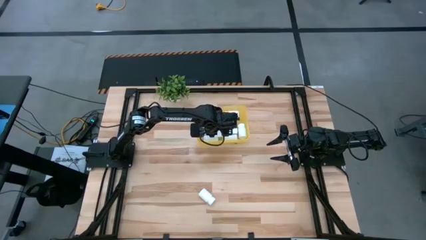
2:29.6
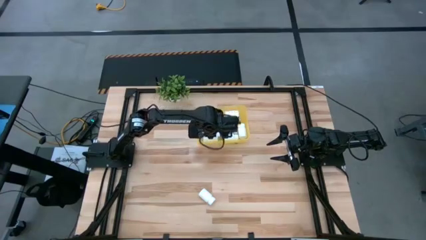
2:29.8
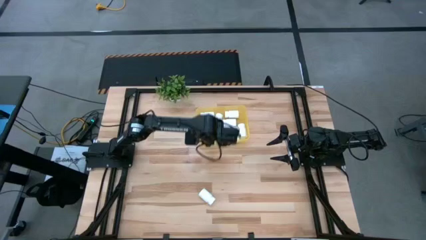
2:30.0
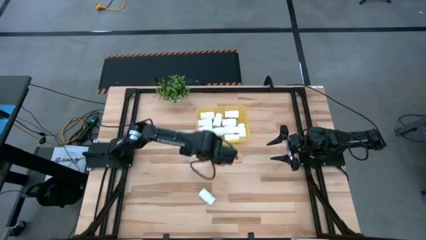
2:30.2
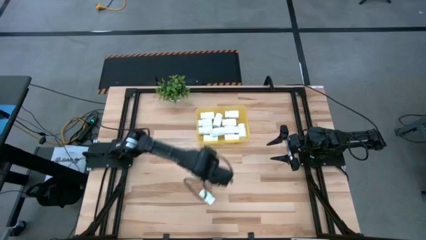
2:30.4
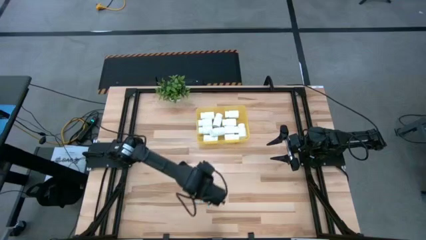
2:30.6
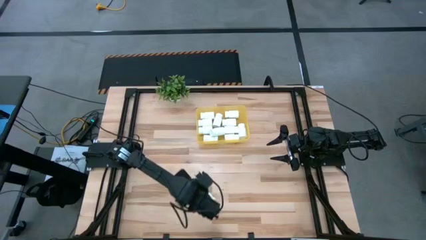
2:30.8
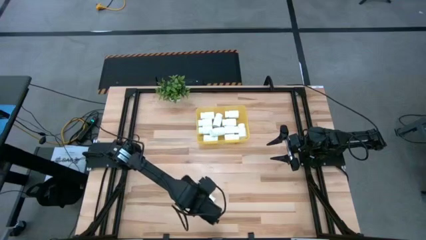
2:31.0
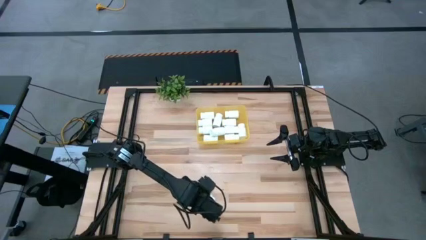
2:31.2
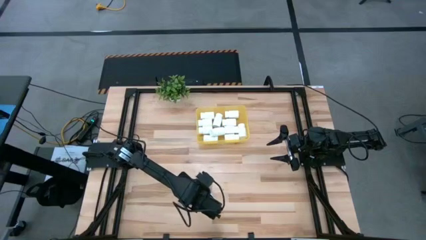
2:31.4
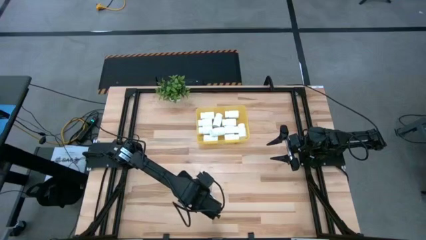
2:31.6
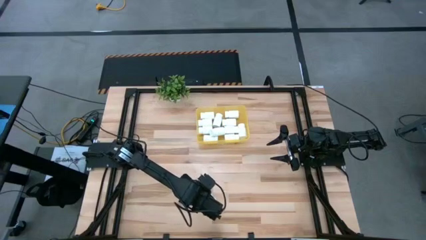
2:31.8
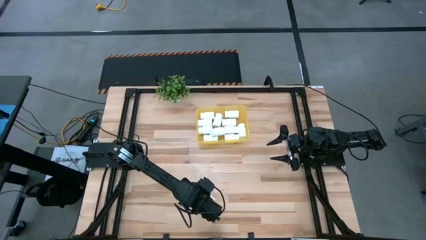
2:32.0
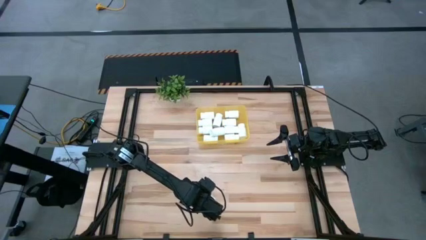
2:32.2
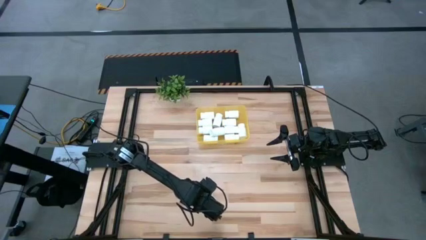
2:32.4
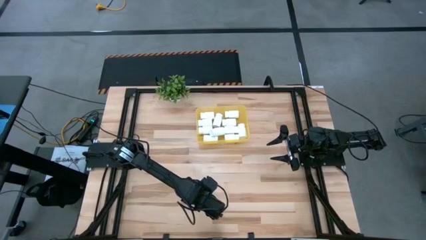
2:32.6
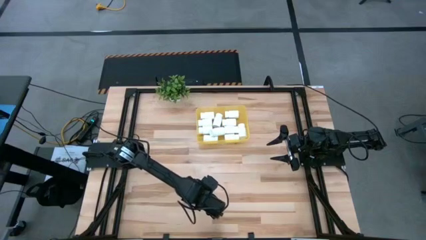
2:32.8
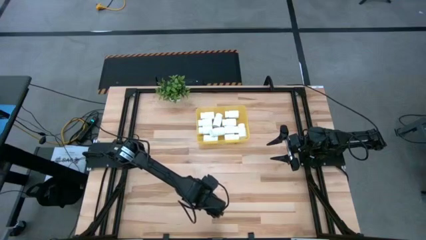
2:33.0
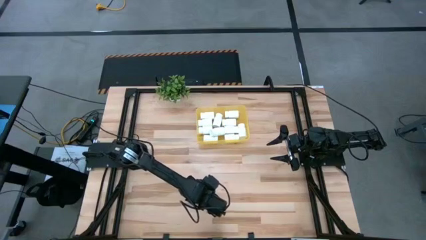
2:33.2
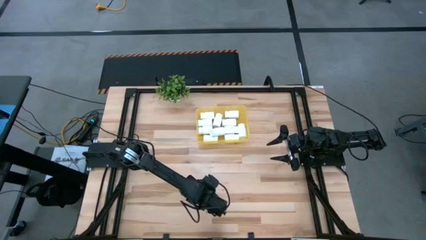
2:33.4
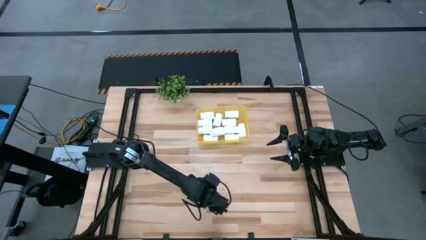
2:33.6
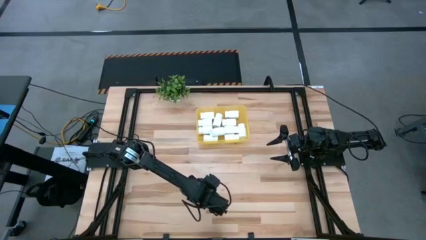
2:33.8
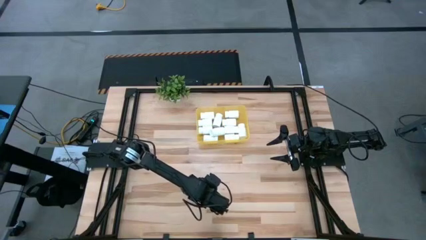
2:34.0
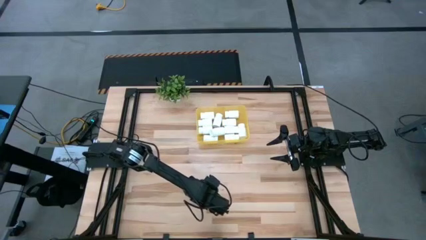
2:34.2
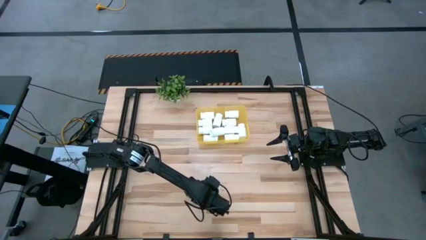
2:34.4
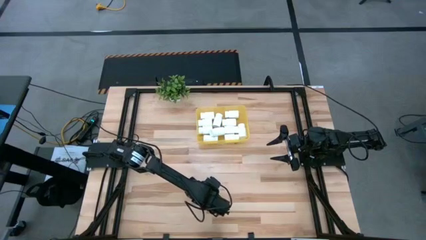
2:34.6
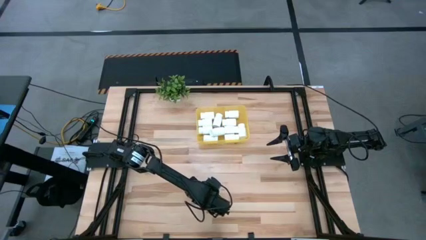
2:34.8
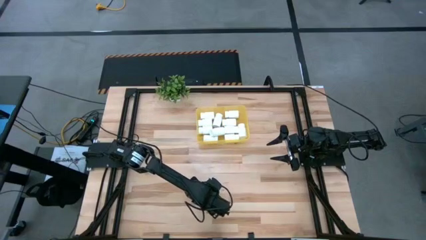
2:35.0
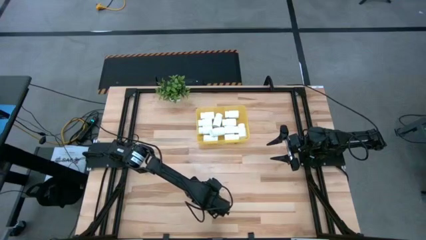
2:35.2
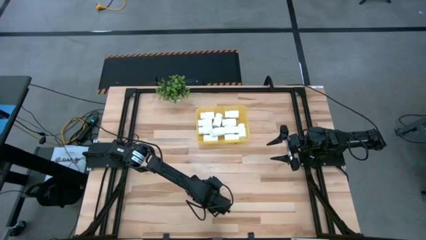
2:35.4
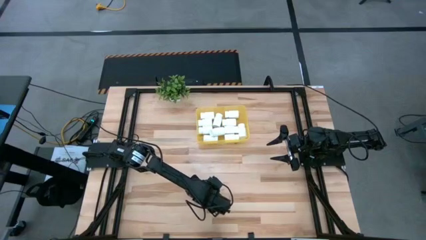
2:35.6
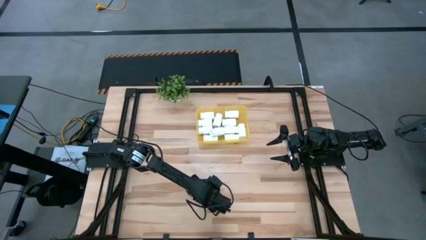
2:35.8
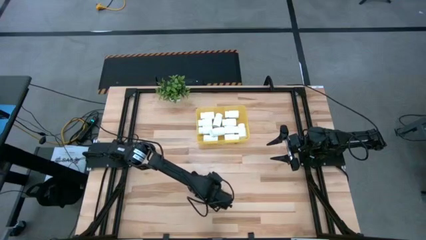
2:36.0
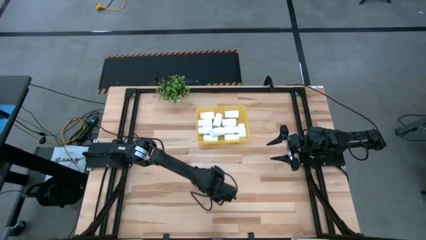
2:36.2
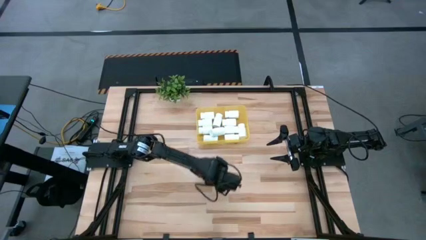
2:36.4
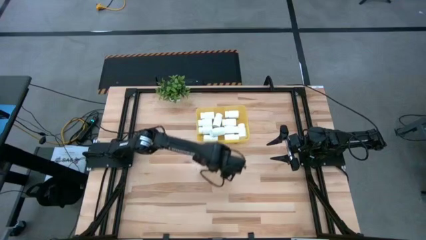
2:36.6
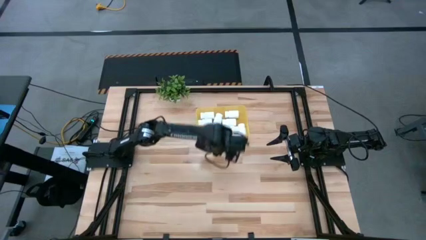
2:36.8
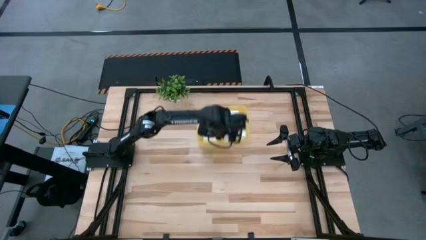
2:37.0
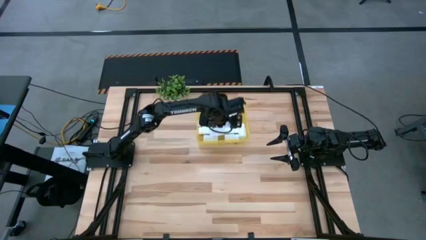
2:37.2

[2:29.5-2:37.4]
Task: Pick and place pill bottles into a basket
Put the white pill bottle into the yellow bin

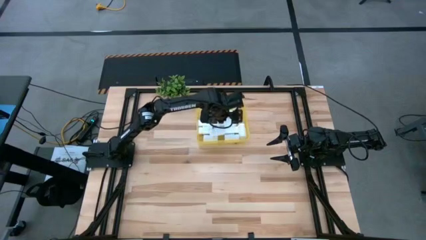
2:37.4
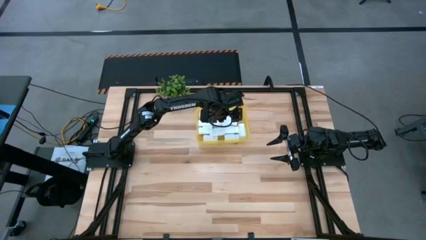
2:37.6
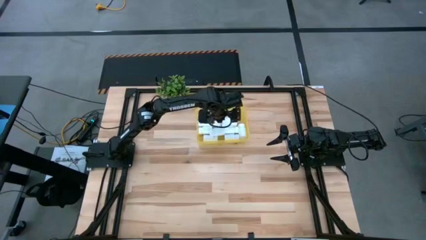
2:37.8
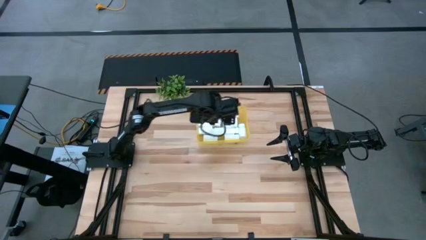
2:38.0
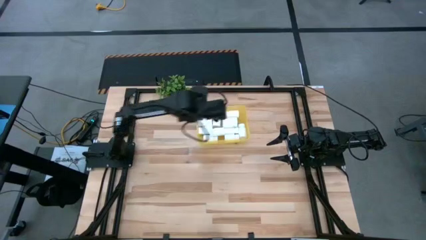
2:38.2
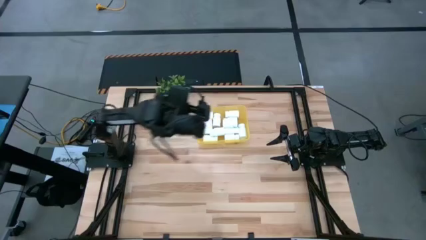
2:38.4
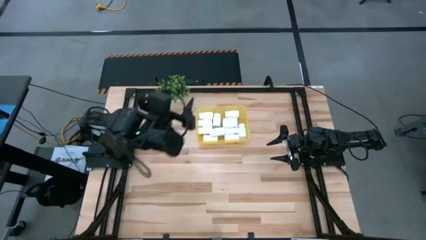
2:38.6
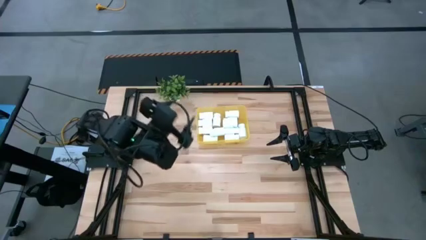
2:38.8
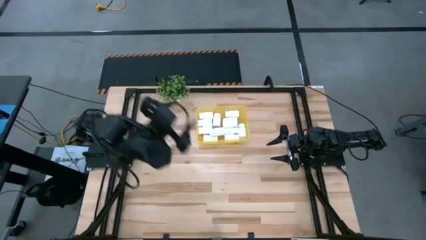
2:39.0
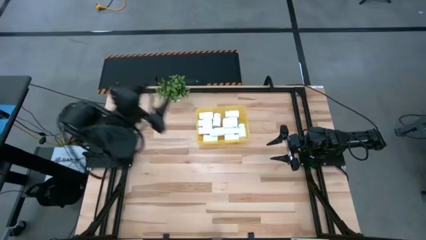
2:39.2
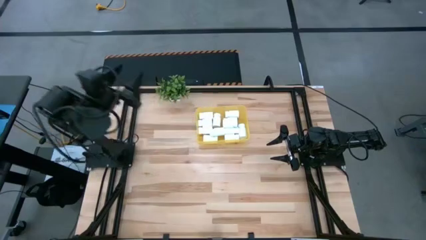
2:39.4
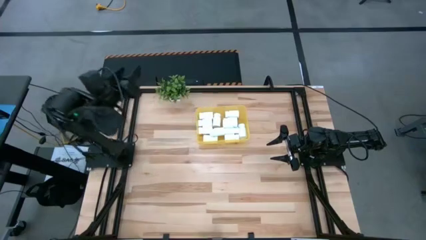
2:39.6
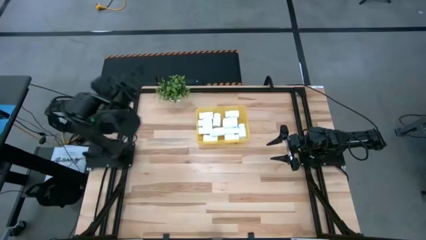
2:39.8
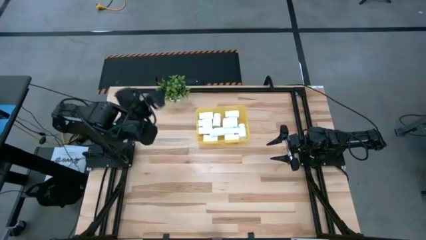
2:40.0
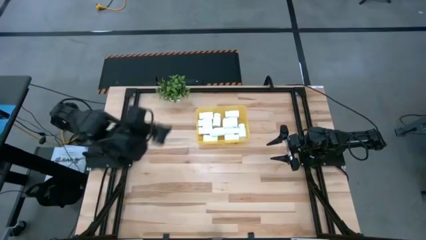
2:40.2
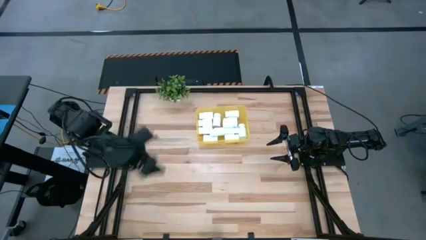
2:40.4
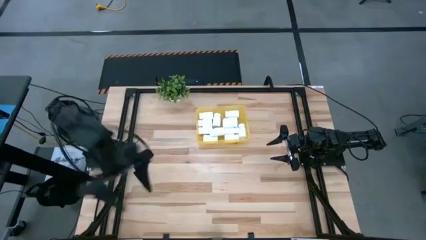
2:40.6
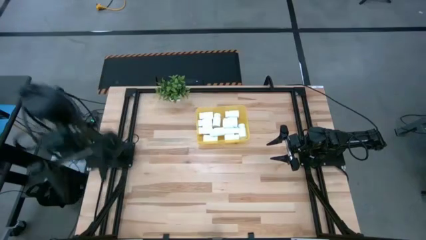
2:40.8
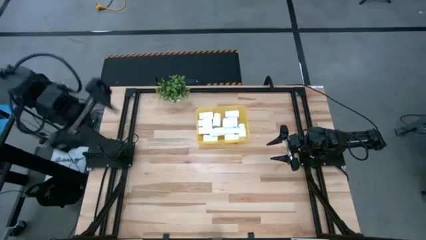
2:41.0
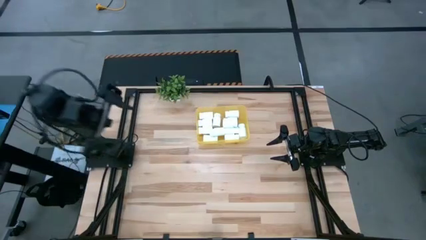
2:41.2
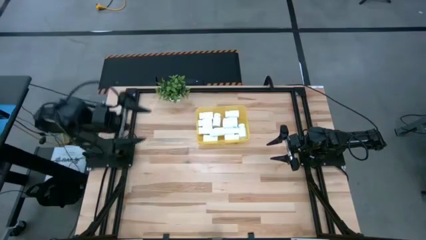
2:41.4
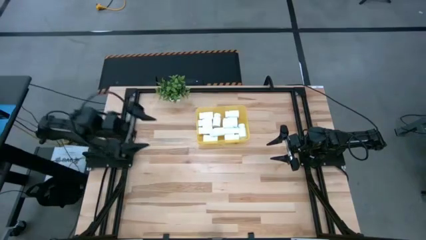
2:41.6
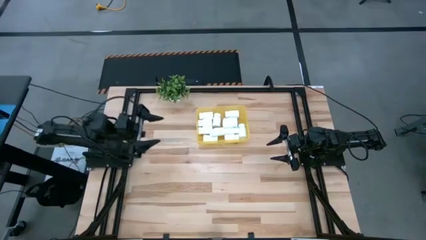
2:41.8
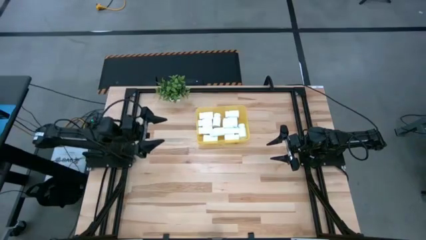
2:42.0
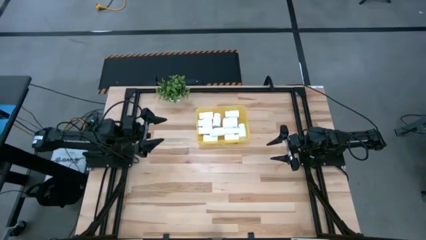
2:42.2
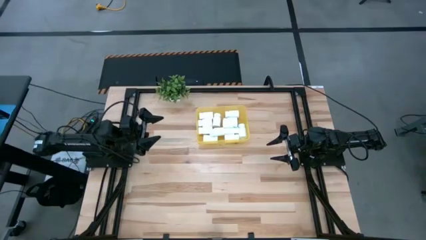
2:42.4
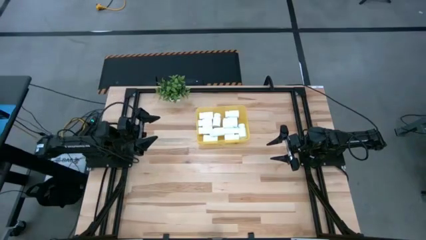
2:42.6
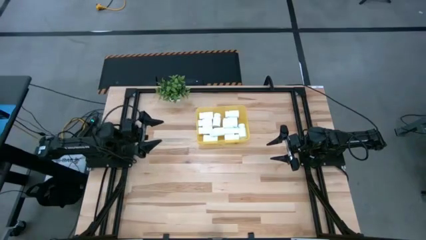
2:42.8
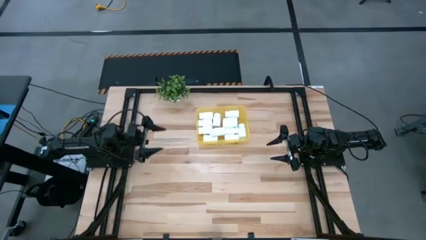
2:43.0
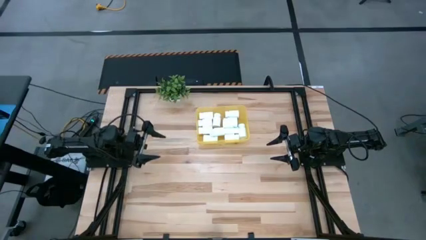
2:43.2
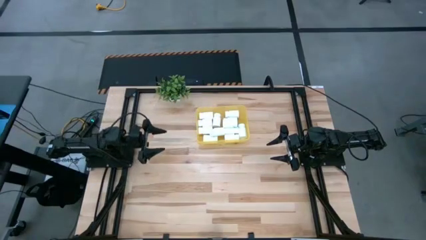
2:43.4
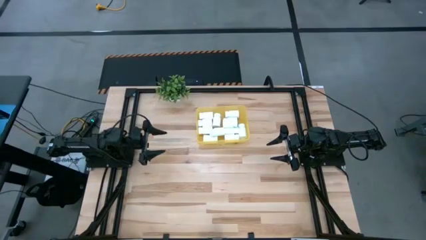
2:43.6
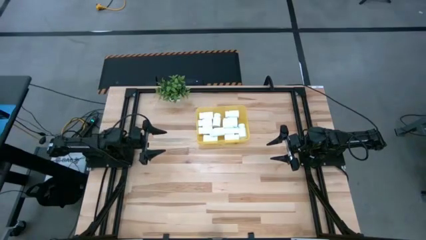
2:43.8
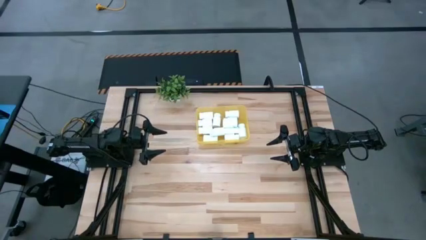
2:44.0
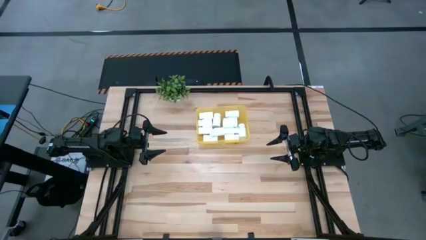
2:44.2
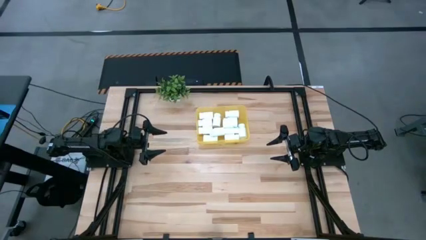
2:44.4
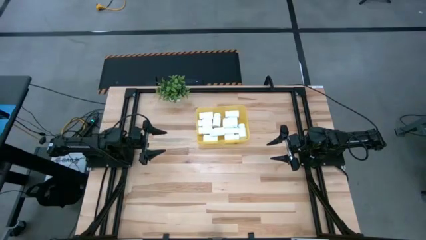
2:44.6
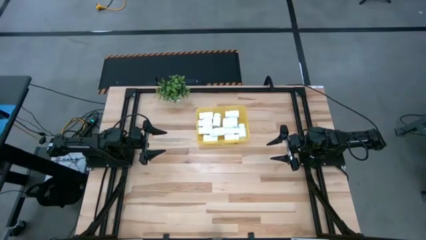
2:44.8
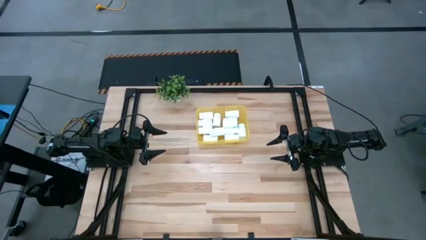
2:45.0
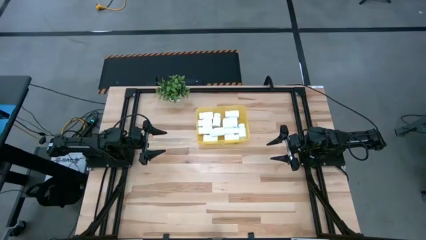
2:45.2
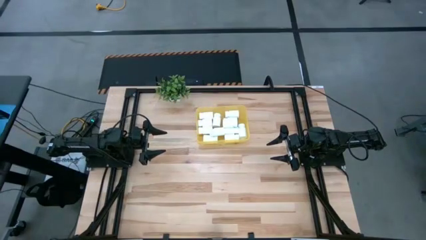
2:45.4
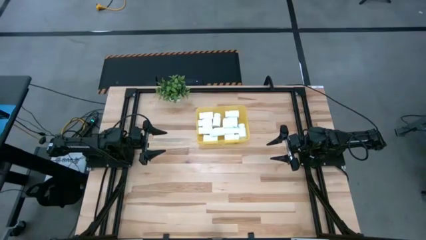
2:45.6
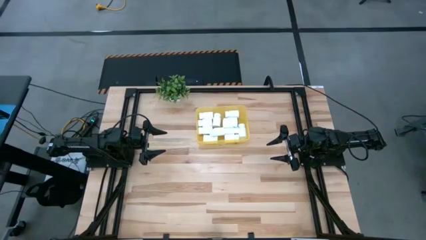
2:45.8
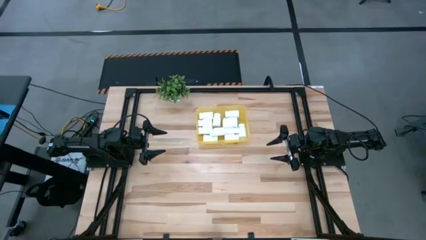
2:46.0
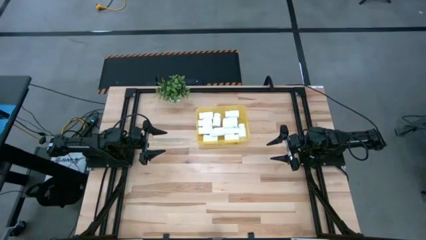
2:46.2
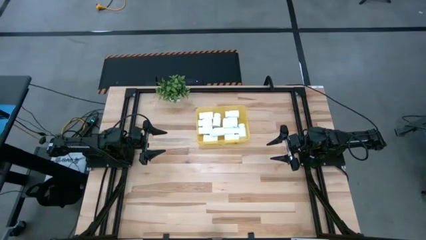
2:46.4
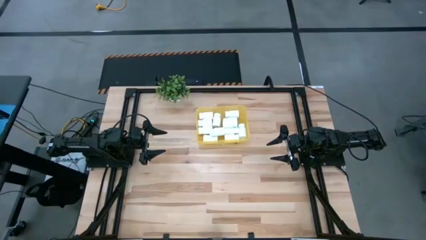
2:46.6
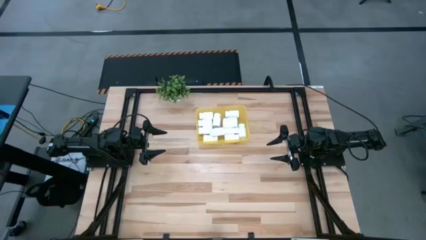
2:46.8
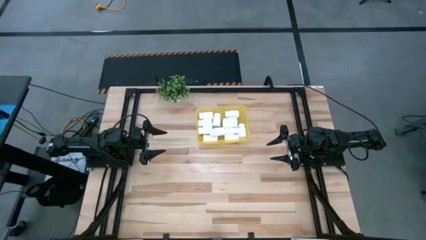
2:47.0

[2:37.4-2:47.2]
Return to home position

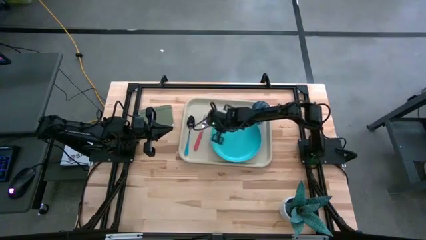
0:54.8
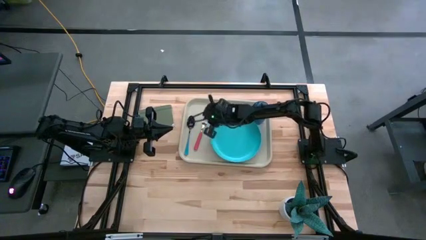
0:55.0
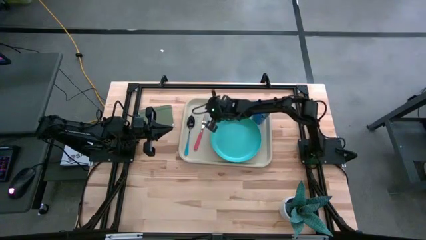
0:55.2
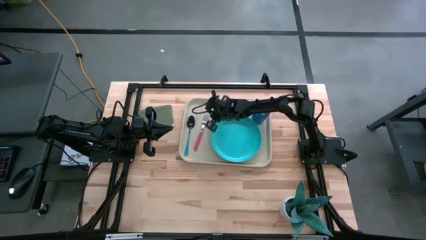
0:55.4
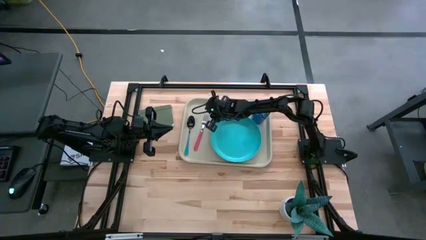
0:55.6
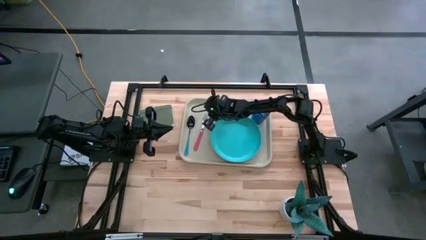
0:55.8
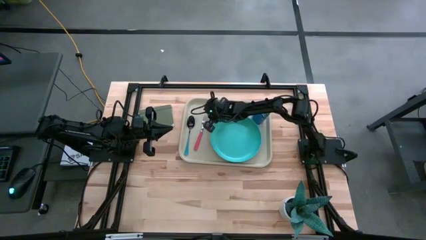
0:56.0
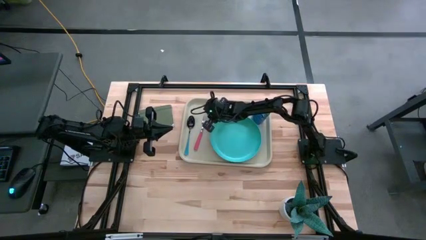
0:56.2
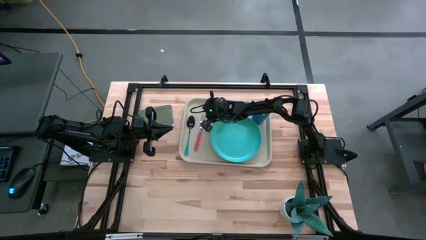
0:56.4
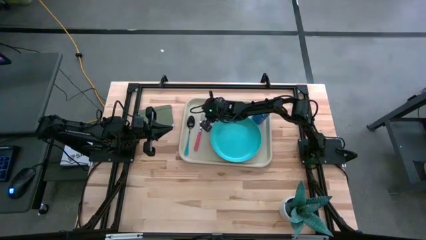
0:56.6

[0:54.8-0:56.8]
Task: Pick and place plate/cup/fork/spoon on tray
Adjust the pink fork
